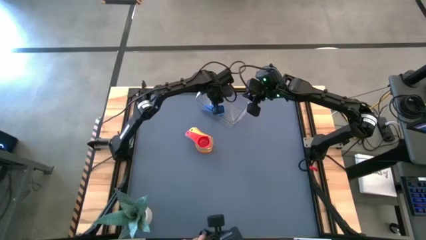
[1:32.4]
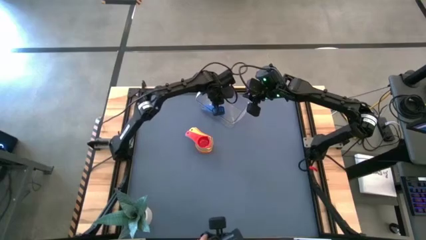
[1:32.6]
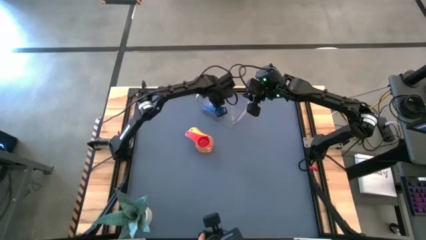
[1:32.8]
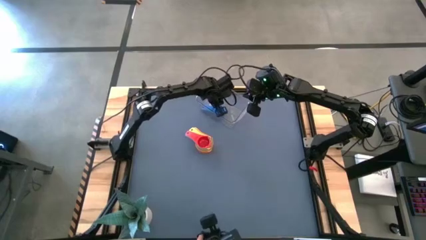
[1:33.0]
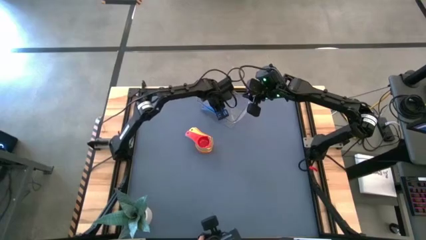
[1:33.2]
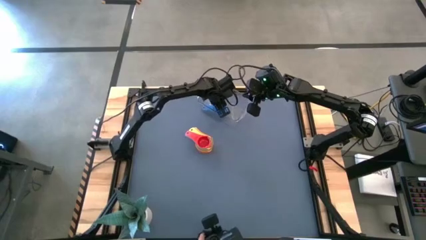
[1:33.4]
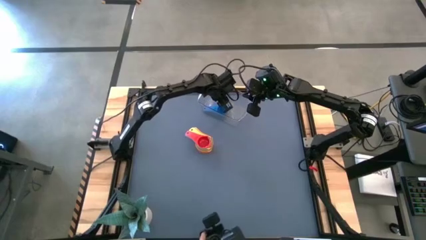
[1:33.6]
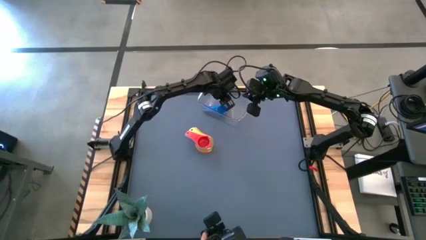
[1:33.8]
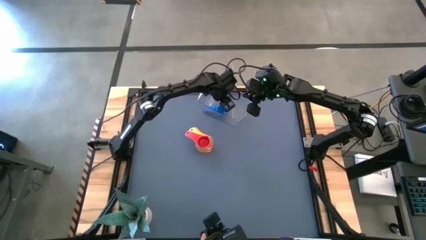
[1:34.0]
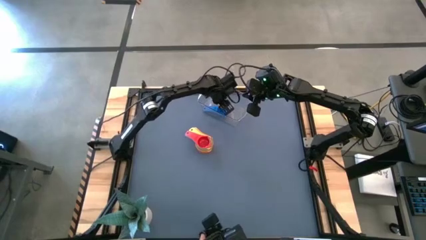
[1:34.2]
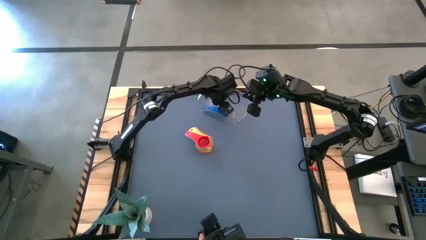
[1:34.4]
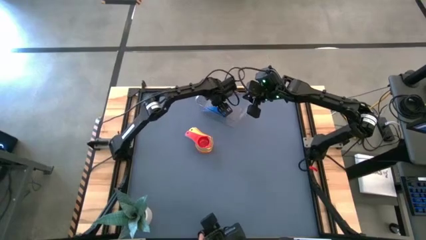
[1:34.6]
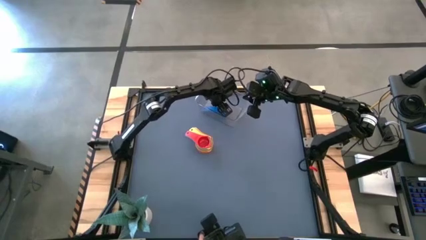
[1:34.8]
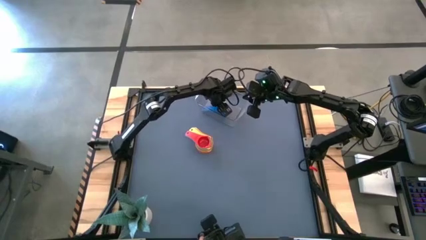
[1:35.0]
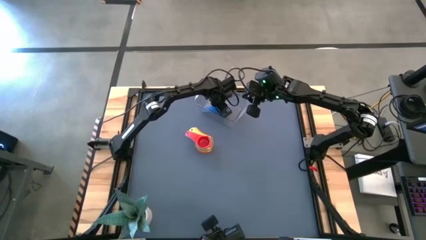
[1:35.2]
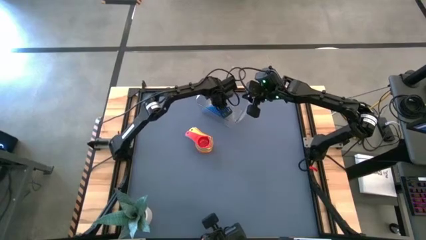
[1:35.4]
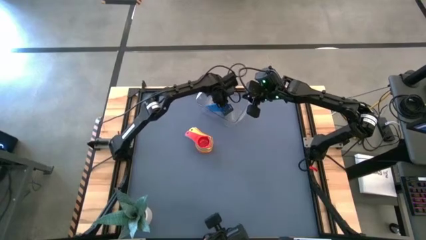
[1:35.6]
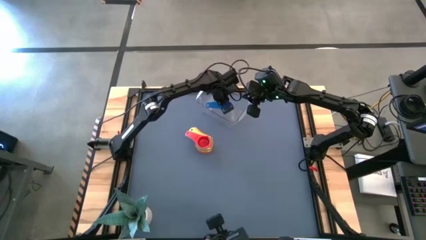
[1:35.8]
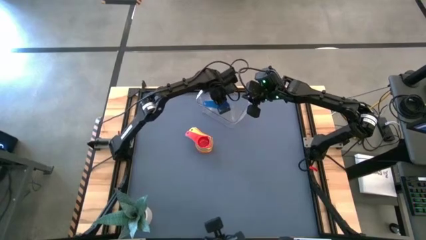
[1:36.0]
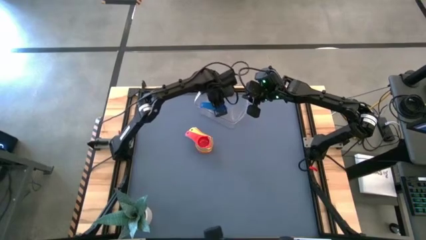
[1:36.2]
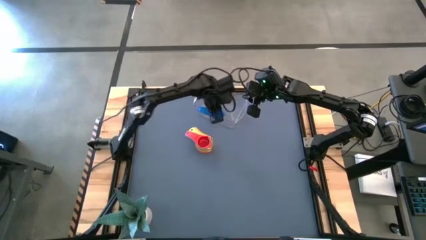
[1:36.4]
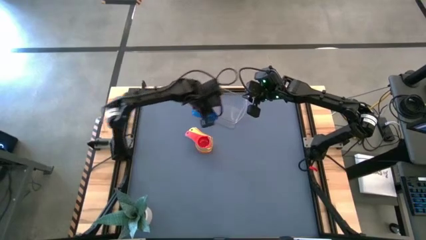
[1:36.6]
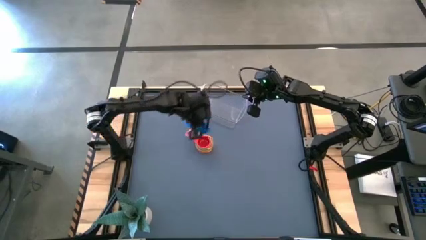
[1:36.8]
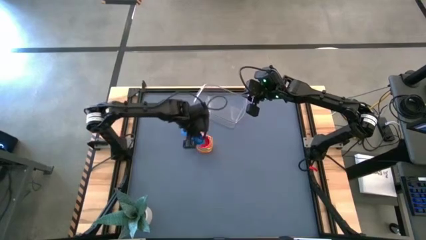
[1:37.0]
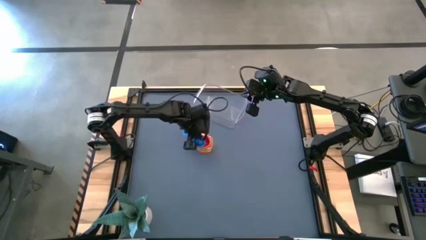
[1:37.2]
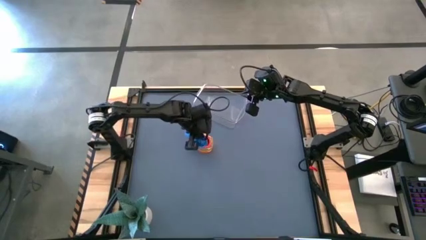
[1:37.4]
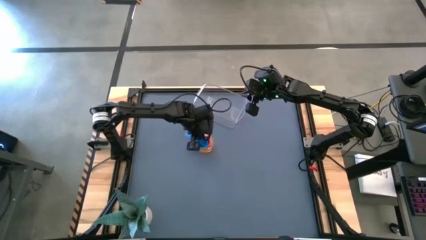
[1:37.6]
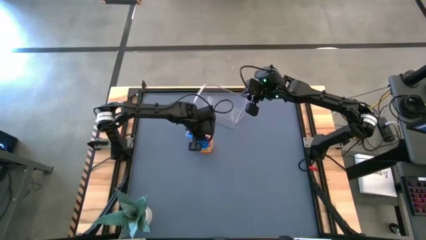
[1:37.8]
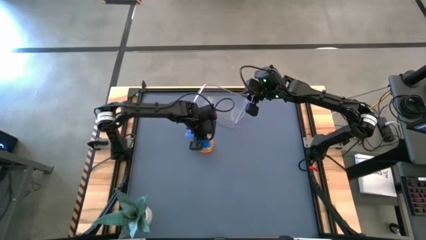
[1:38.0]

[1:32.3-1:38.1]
Task: Nest measuring cups in basket
Stack the blue measuring cup on top of the red measuring cup

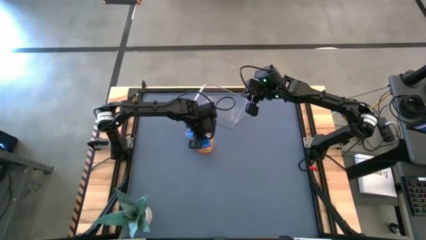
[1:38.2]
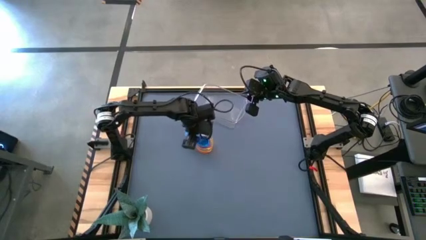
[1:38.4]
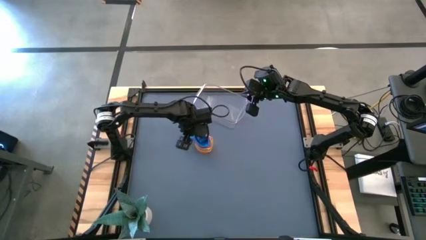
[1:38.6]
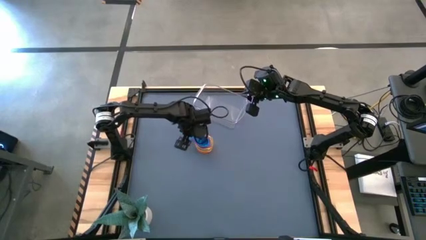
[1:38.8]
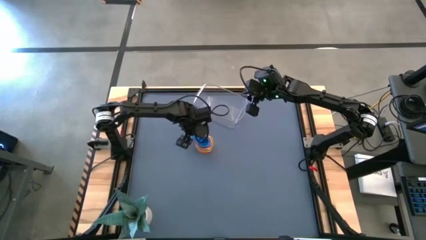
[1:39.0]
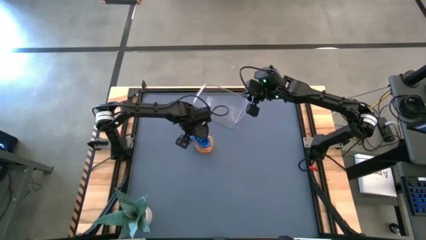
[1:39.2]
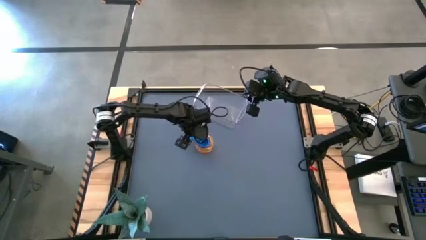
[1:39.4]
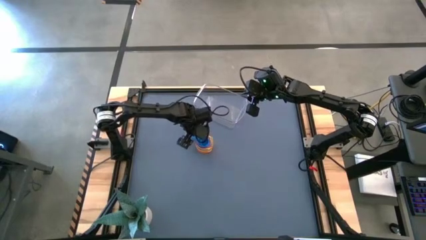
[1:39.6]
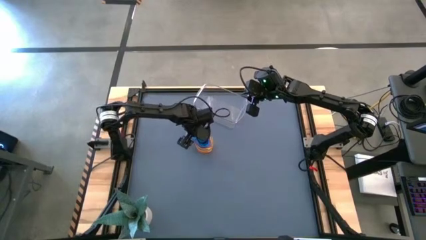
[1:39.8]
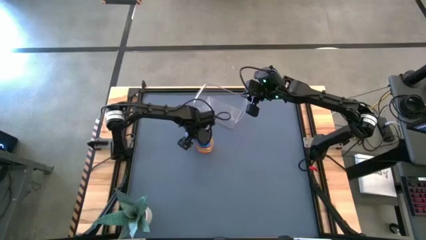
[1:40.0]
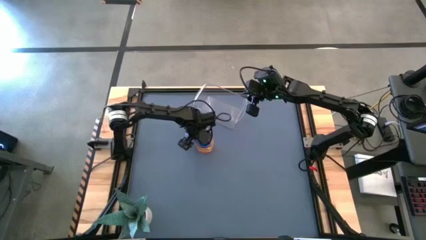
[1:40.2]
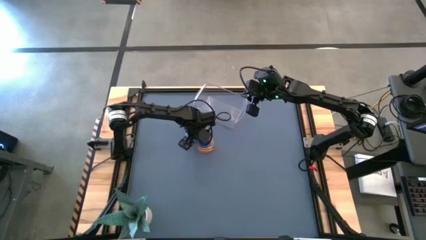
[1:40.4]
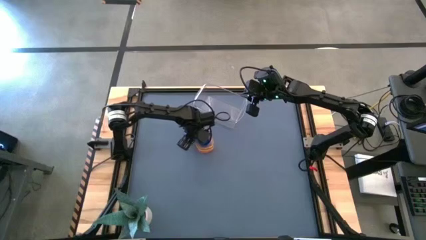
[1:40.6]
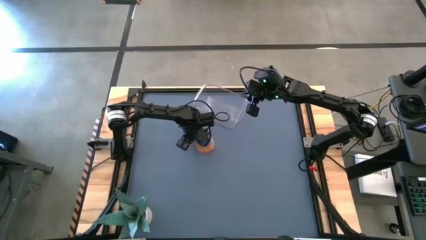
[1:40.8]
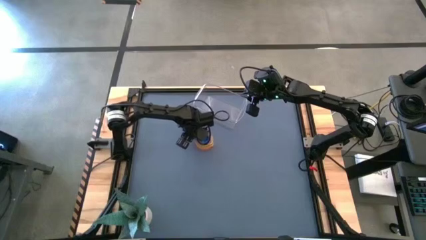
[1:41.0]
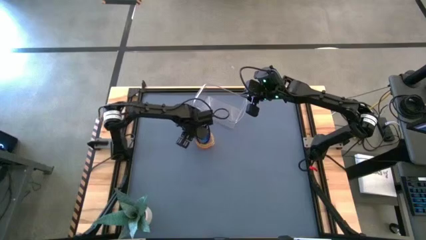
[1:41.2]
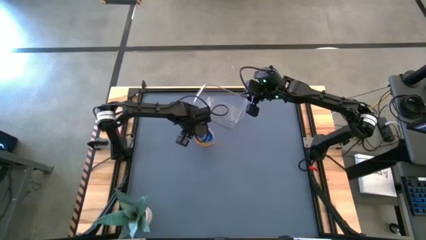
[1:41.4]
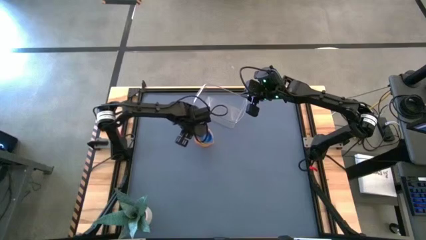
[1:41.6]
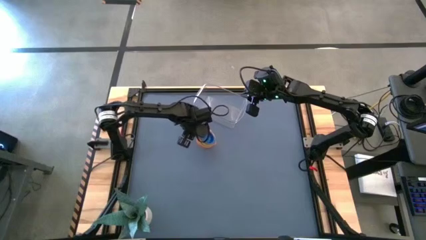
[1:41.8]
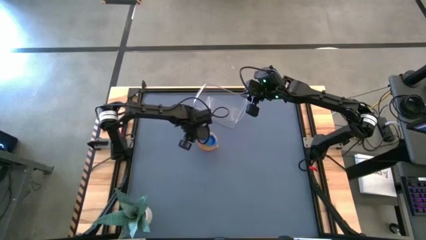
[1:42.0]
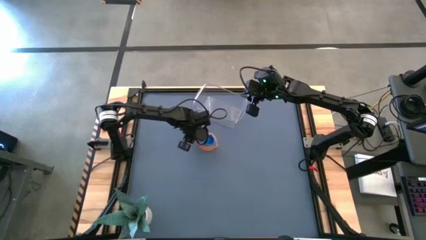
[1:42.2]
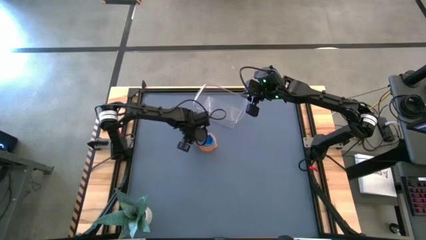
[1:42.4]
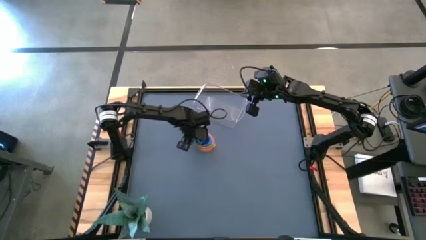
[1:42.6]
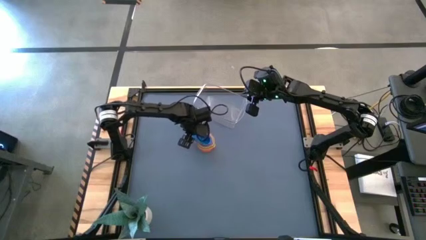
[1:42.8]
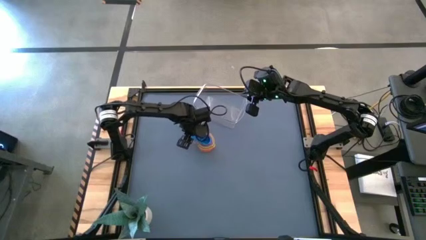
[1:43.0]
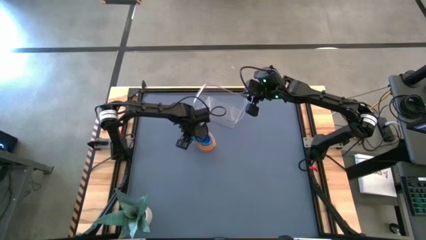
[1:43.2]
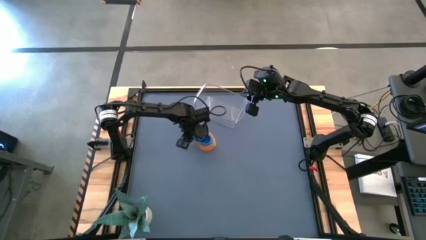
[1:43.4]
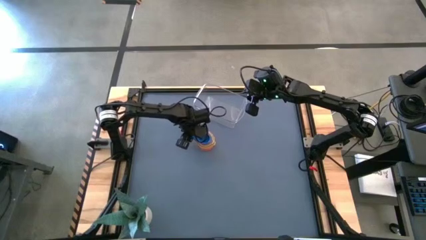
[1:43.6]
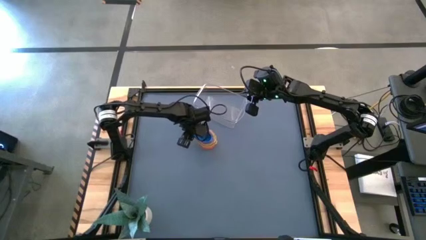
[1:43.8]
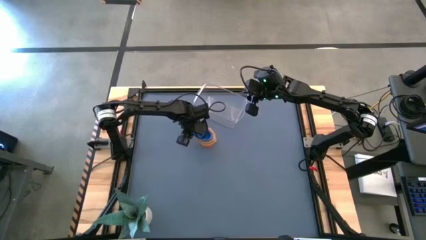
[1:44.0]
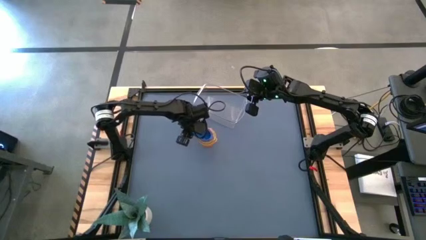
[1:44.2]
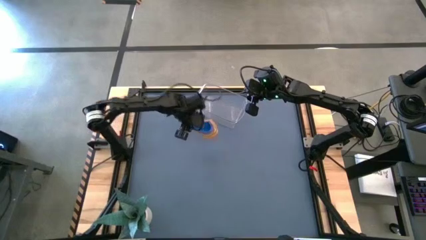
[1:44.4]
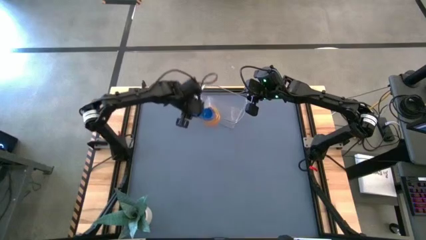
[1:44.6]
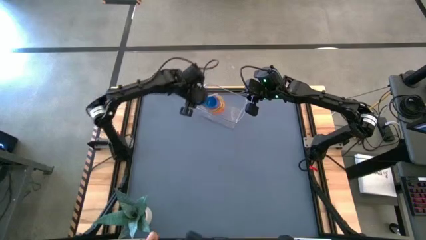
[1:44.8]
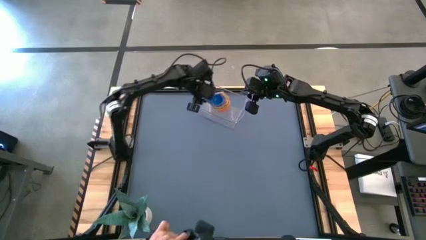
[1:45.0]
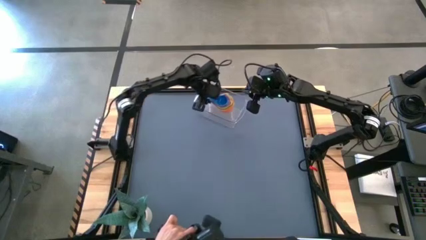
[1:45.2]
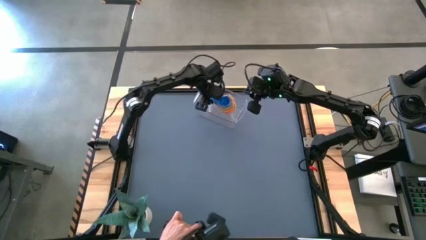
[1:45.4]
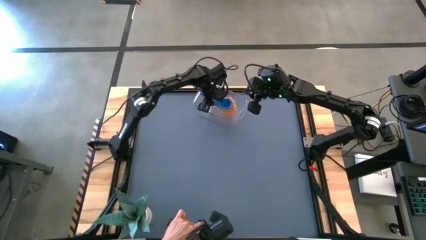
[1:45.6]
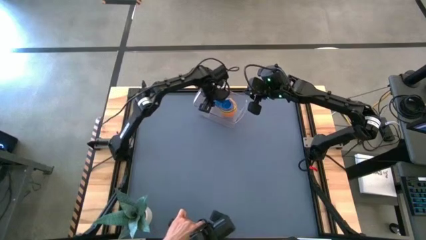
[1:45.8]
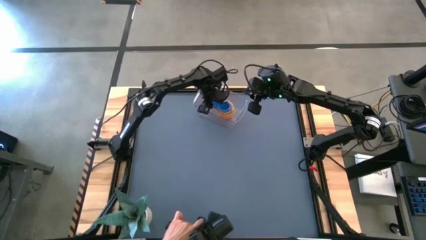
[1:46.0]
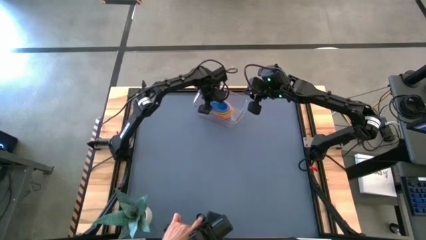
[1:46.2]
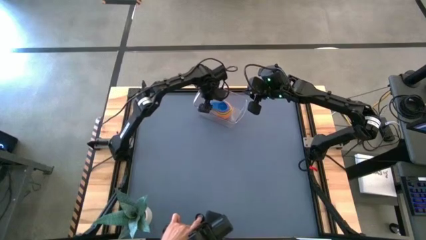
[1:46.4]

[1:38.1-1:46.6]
Put the stacked measuring cups into the transparent bin

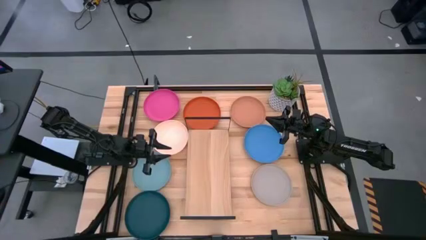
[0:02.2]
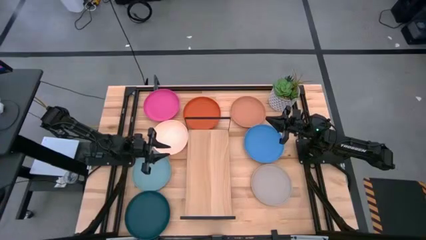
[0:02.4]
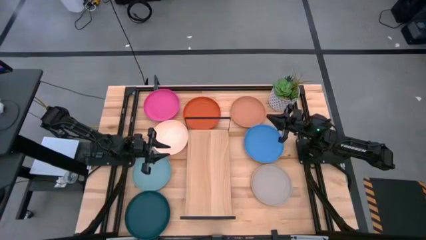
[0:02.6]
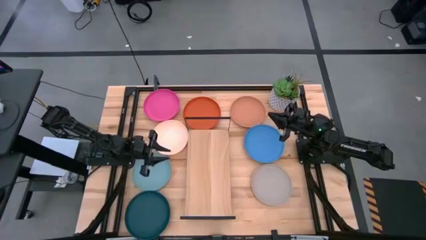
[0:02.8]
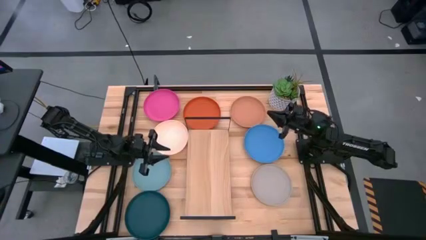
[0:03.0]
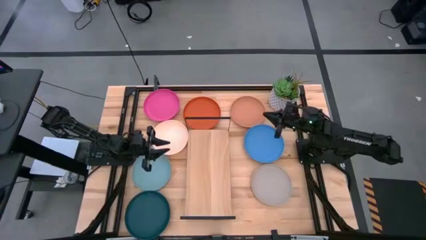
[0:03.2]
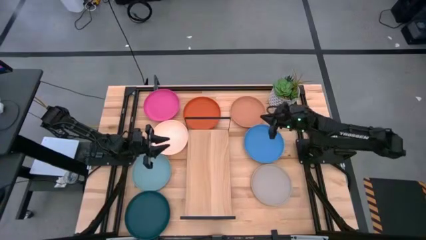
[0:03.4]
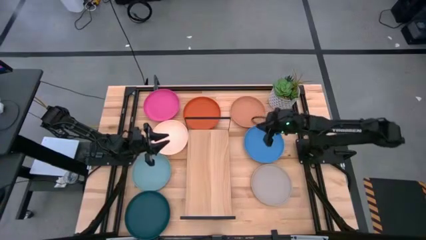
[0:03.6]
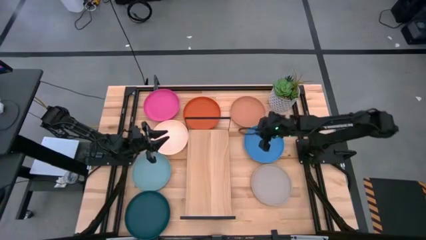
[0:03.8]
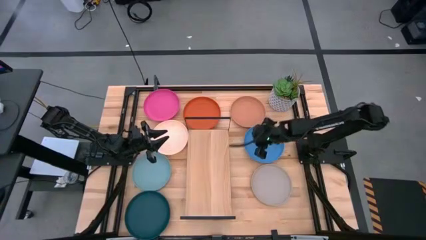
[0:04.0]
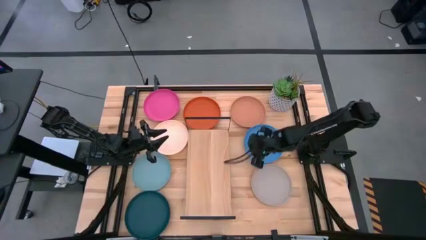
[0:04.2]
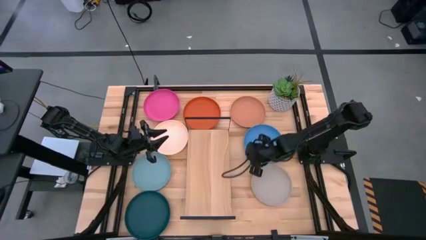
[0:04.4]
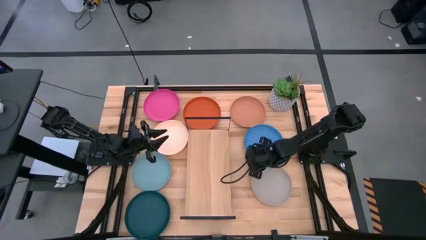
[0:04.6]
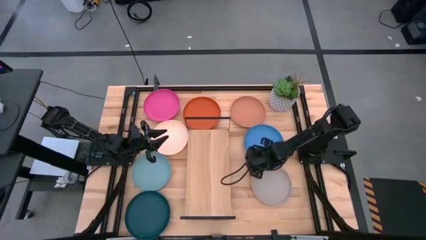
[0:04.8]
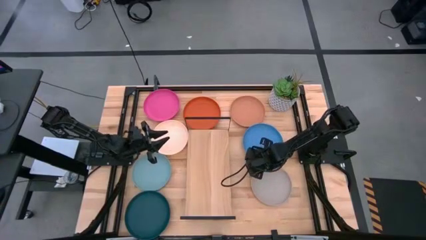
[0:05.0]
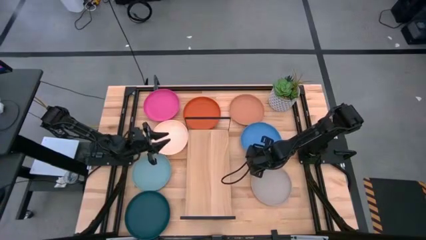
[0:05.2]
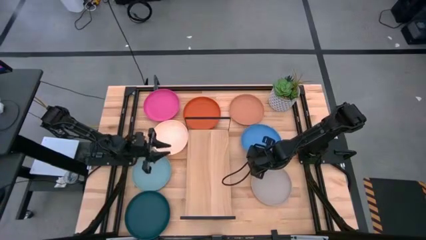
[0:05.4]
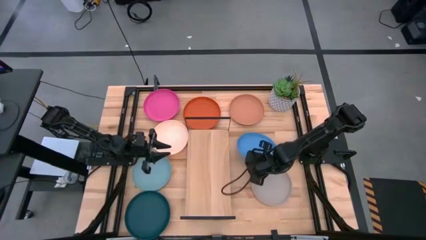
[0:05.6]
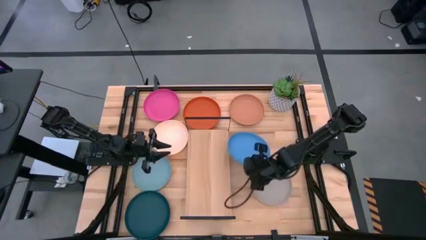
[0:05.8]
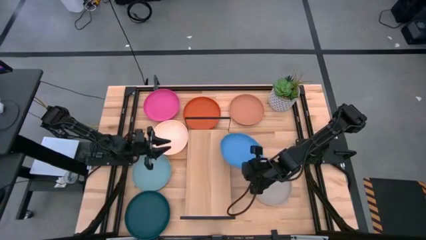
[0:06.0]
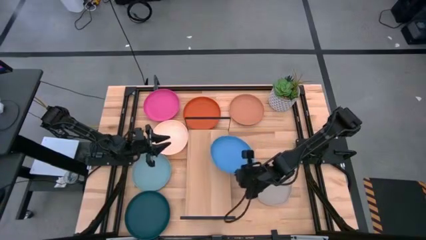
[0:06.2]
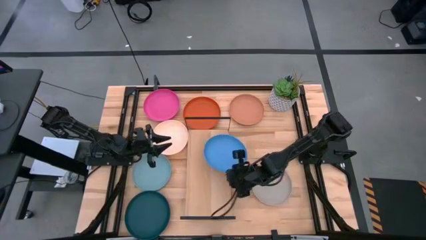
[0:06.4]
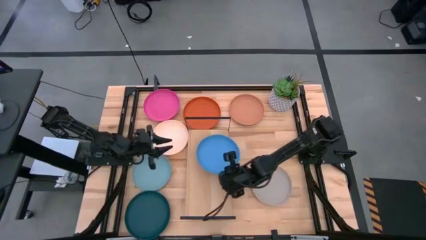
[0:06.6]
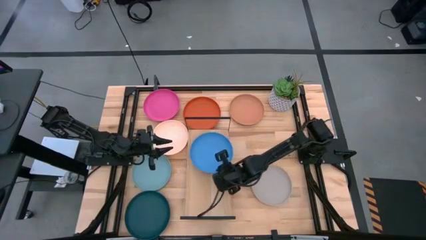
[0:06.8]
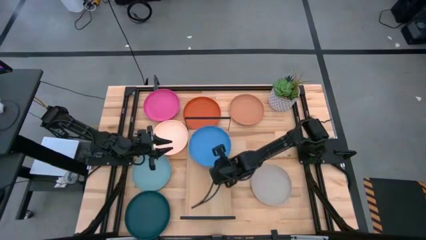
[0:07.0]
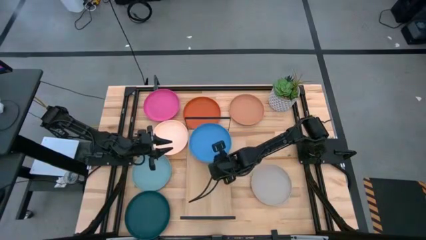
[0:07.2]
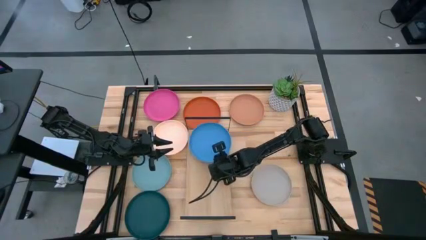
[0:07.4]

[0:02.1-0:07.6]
Task: Place and stack plates onto a shelf
Put the blue plate on the shelf
